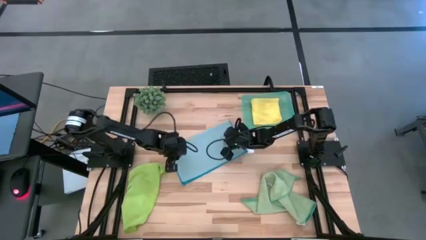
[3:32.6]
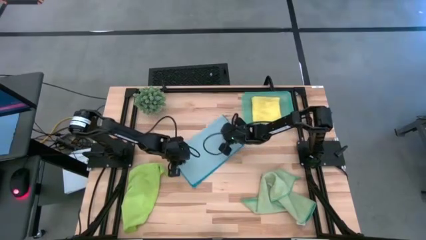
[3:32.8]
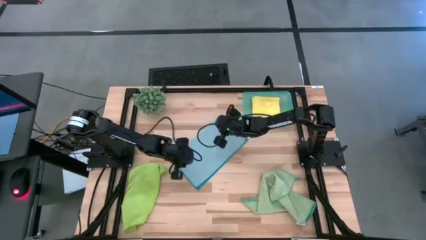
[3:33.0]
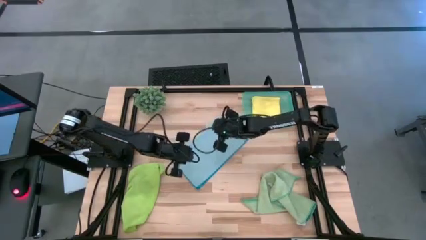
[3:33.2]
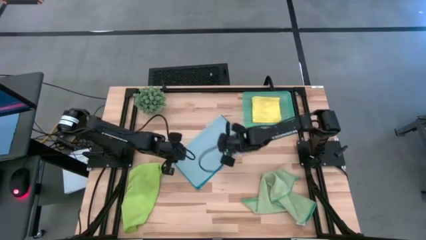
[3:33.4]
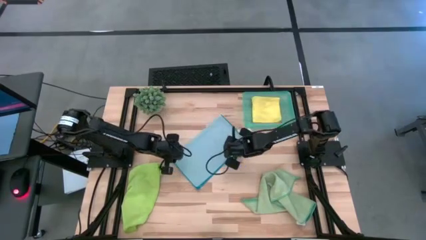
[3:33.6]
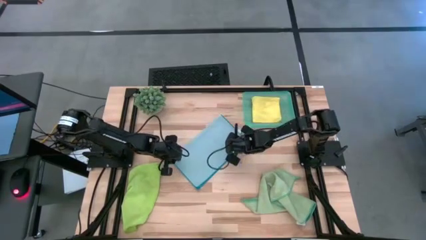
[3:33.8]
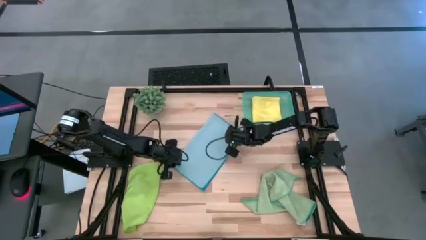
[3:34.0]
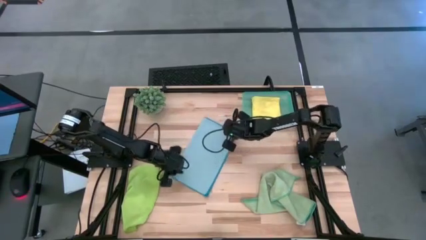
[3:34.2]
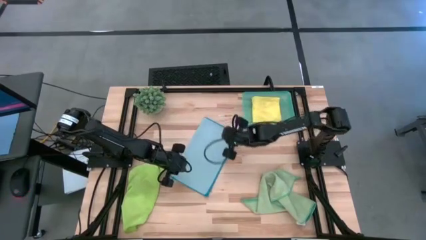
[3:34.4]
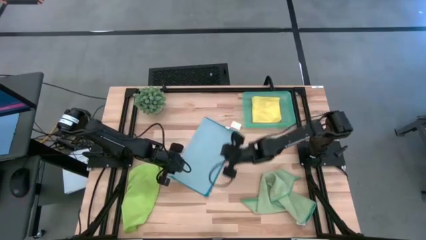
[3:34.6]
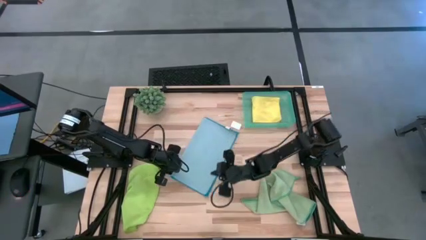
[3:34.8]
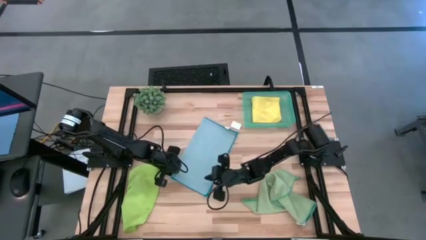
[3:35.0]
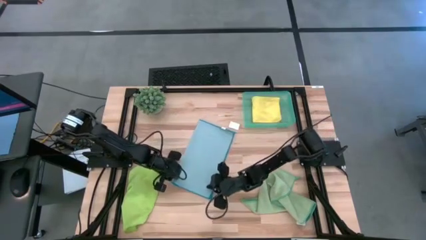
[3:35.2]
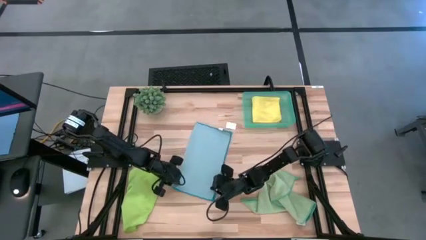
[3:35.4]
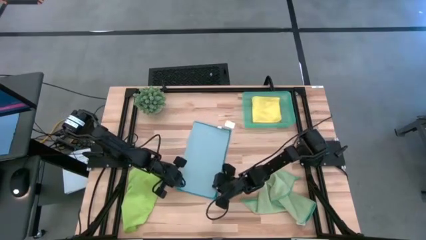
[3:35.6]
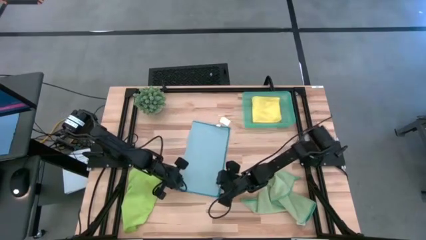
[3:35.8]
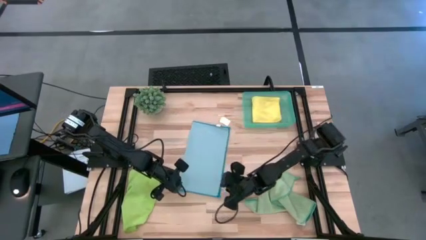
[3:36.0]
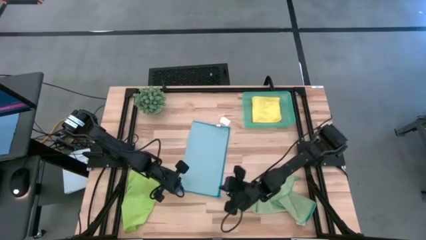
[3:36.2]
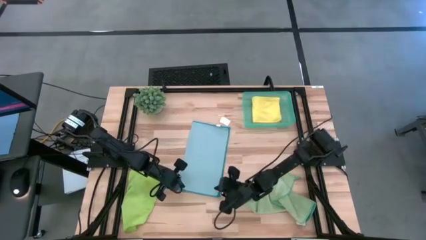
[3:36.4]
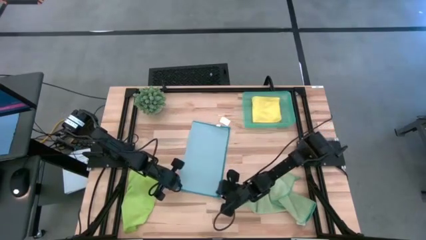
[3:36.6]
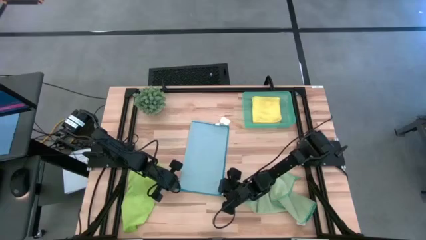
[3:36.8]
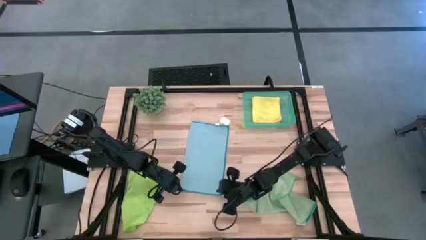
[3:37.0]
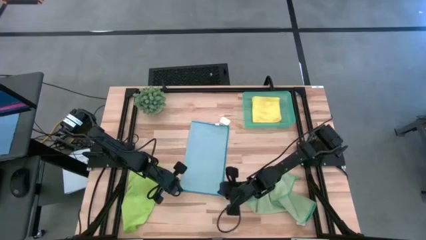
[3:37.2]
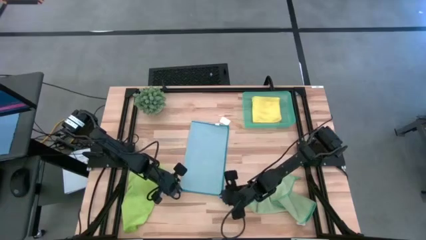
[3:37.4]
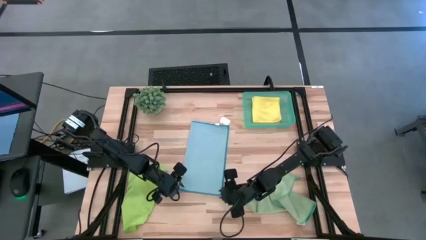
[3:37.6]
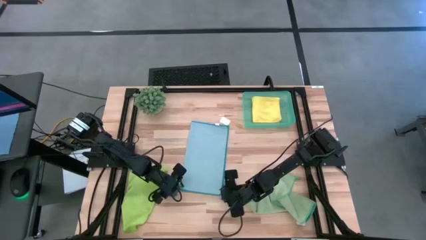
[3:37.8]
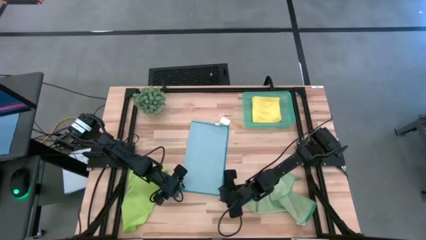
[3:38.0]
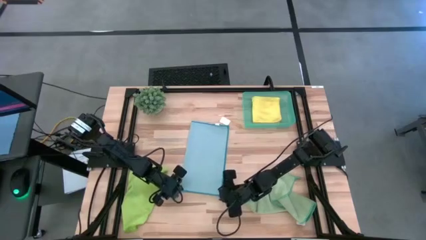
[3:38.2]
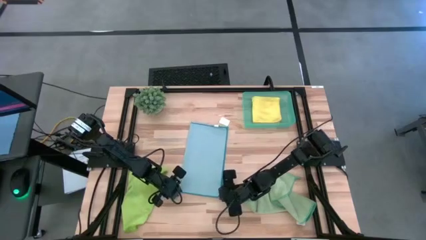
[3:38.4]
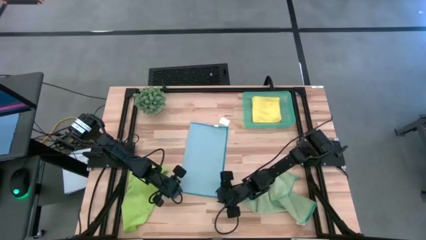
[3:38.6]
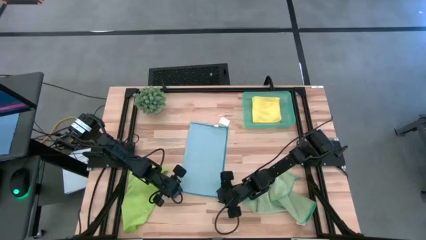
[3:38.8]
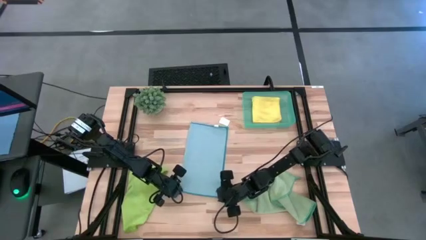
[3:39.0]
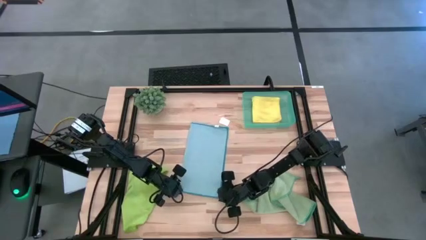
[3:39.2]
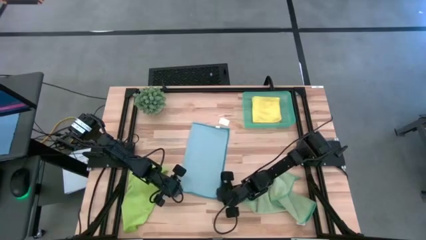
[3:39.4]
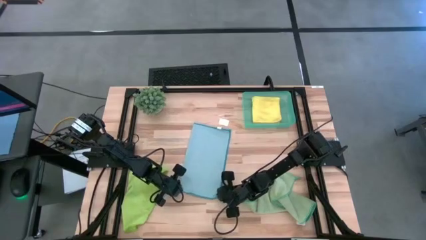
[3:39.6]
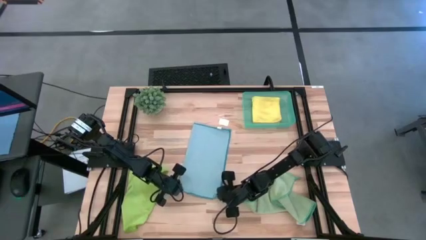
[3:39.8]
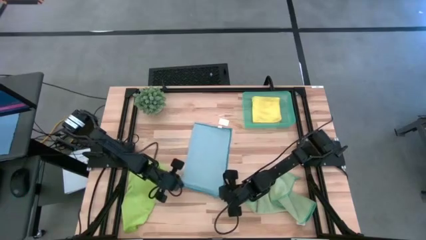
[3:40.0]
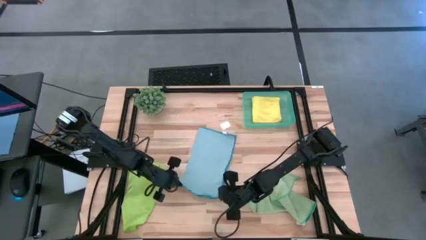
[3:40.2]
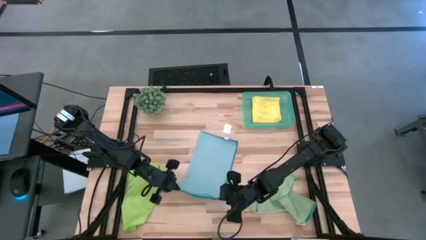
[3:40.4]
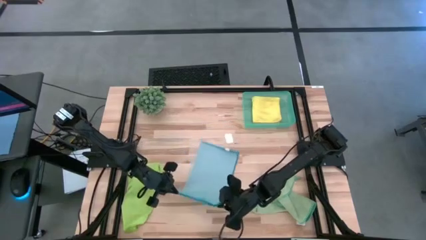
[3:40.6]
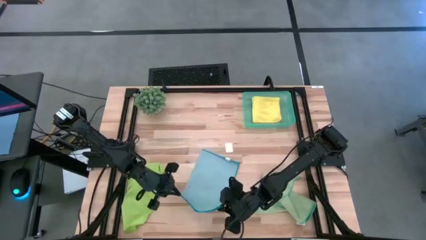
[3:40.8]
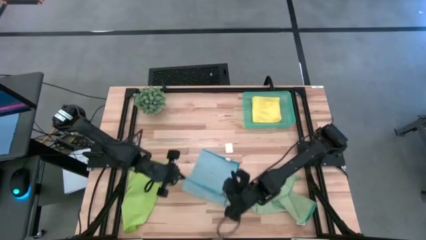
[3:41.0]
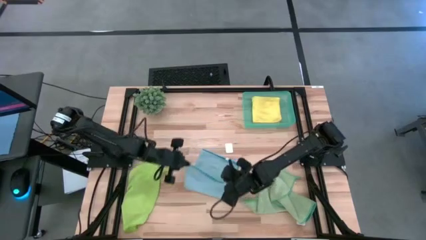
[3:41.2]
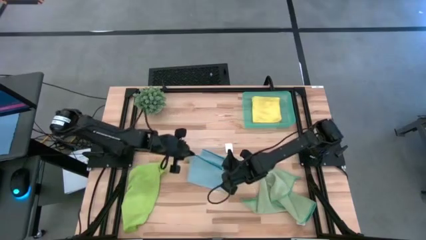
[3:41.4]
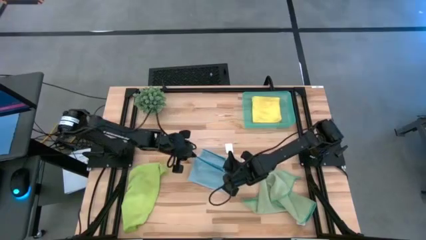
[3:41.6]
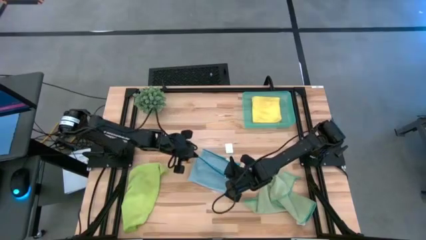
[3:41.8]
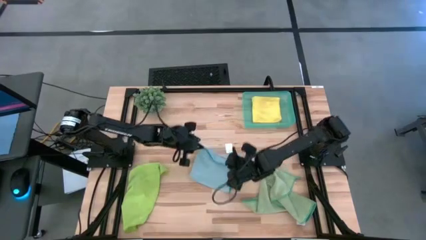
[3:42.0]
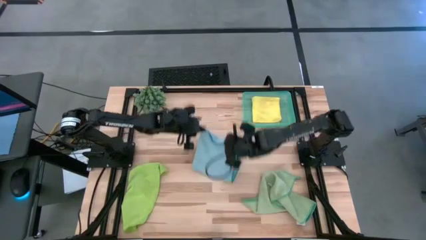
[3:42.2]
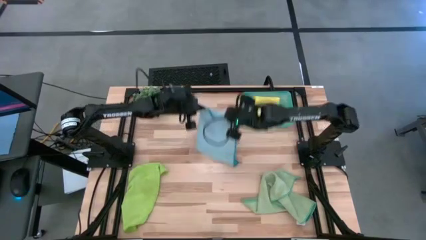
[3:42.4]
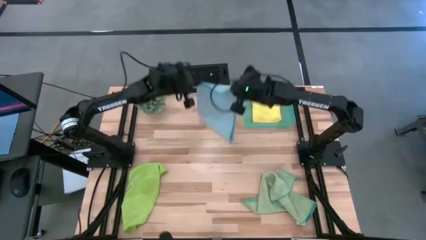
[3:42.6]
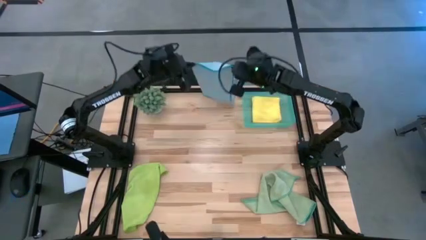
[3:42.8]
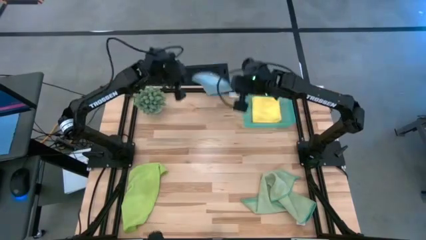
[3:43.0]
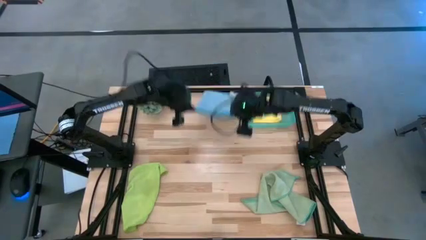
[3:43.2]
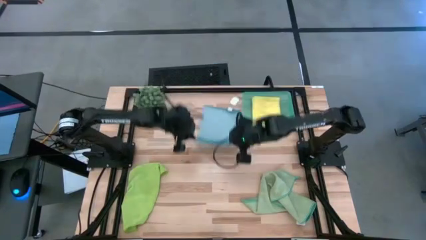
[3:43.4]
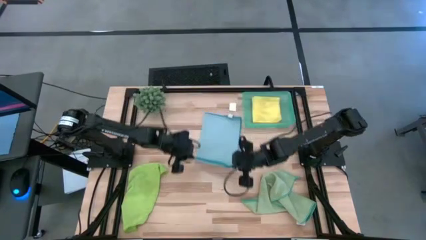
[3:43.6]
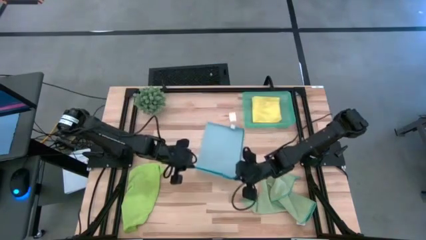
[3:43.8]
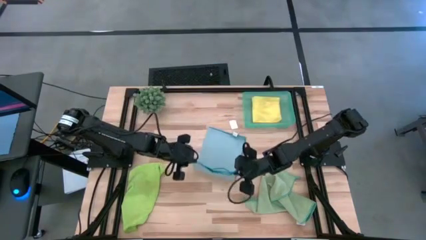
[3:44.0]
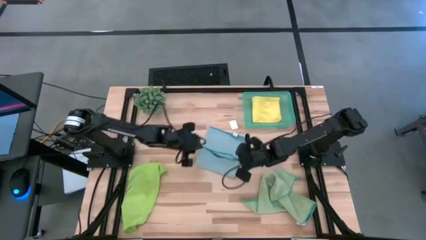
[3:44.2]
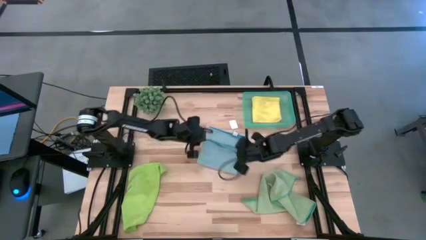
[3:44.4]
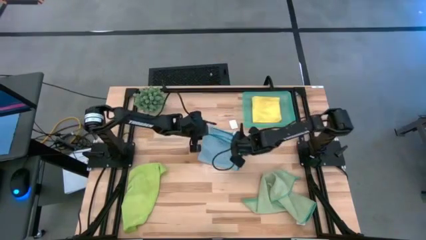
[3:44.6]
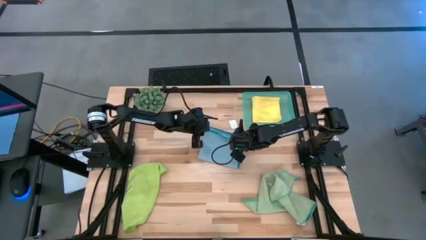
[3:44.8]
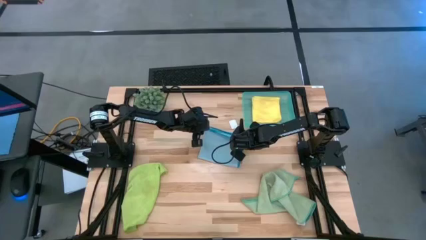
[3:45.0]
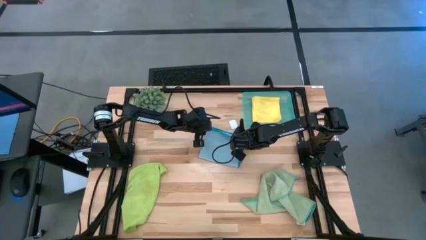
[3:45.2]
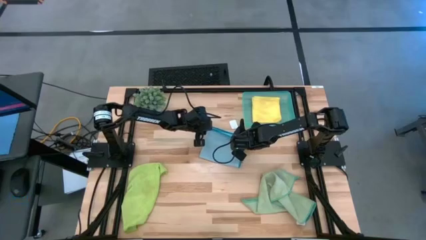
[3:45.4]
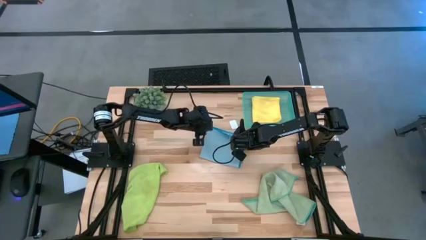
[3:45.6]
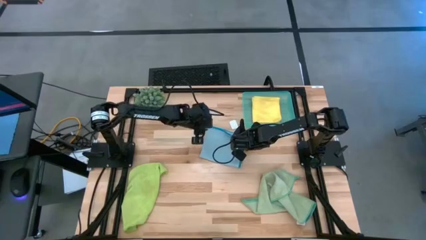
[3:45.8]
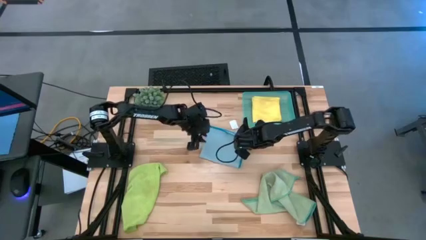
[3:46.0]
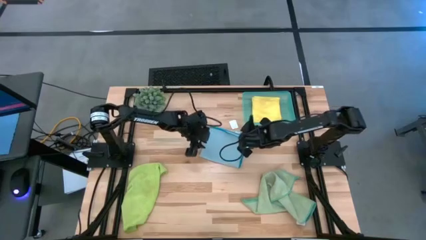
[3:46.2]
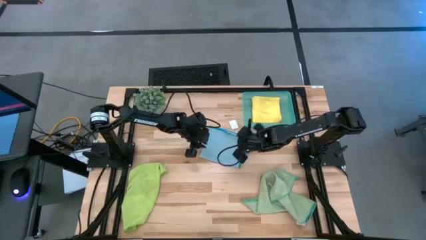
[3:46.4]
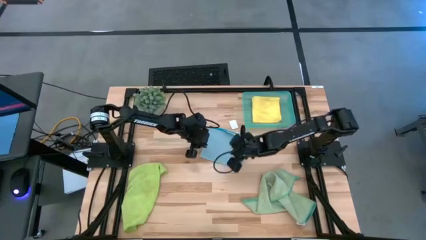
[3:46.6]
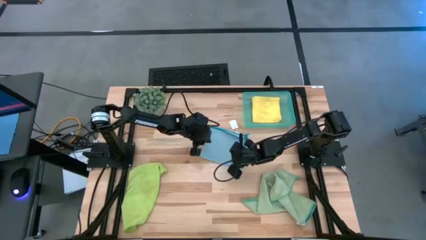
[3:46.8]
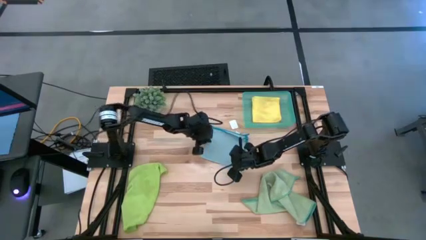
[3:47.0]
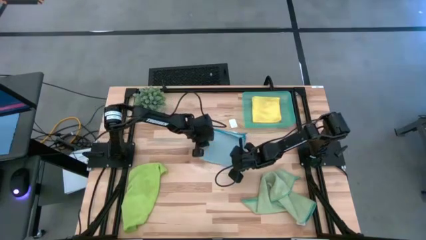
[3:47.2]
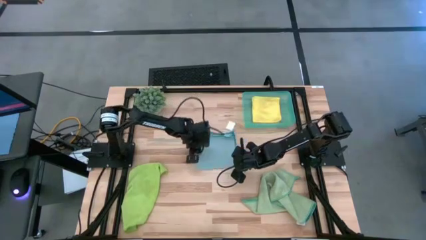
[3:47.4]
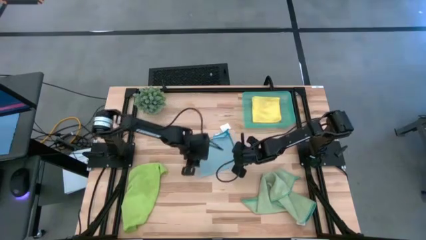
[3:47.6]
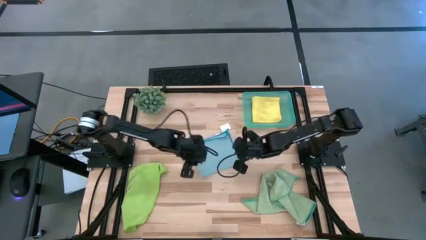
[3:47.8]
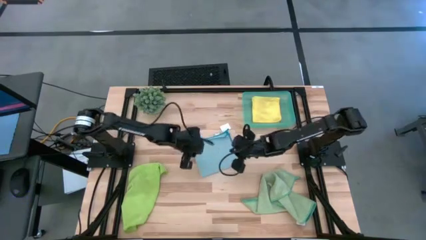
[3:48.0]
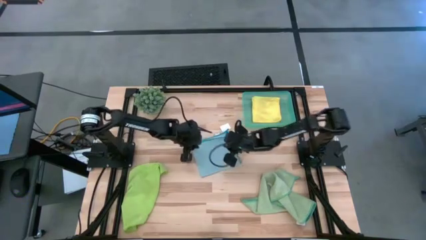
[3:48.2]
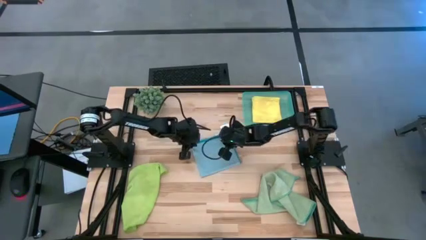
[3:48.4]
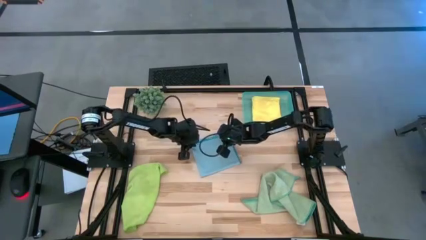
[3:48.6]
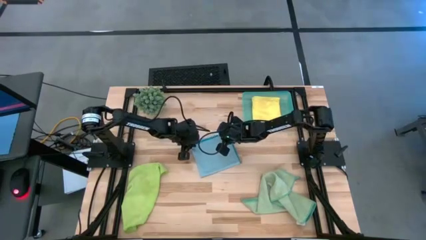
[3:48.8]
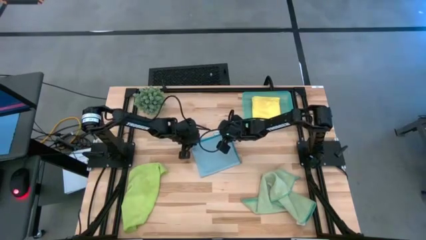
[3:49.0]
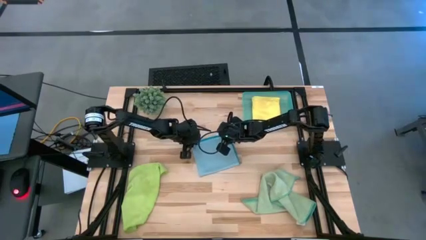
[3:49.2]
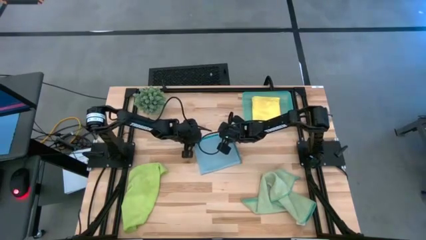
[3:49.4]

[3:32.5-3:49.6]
Task: Fold microfiber towels
Fold the blue microfiber cloth
